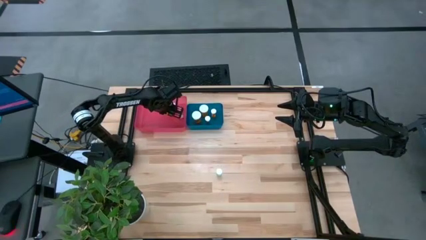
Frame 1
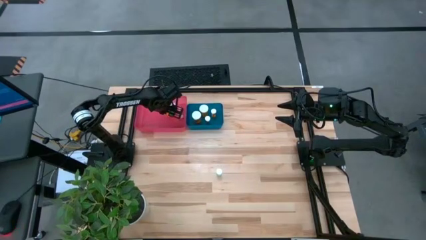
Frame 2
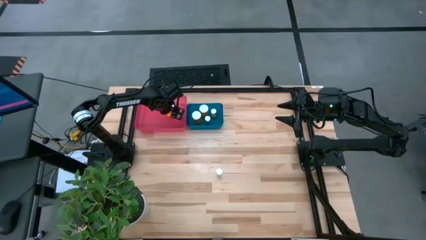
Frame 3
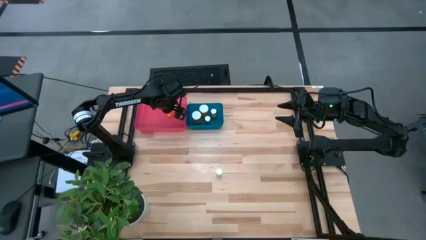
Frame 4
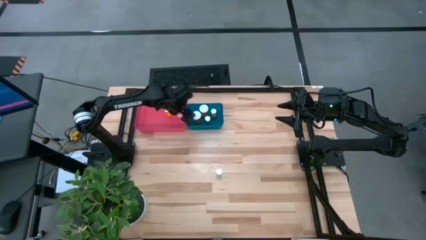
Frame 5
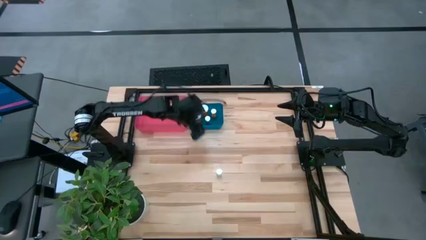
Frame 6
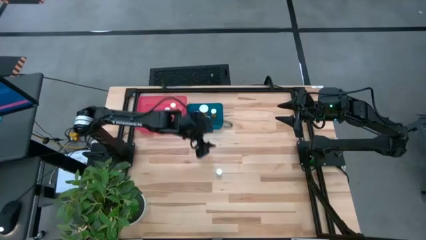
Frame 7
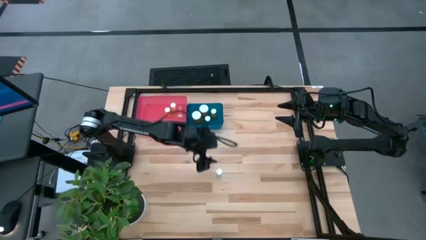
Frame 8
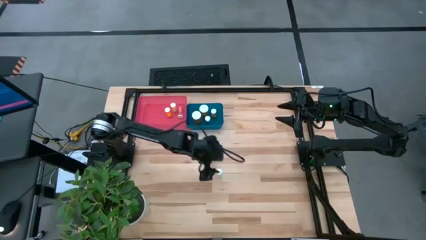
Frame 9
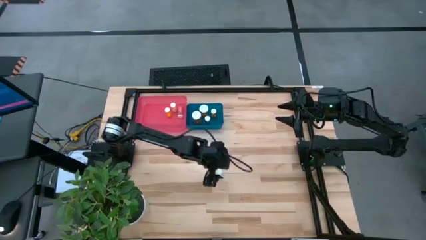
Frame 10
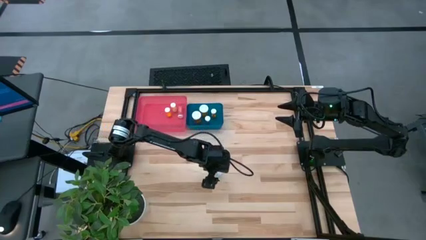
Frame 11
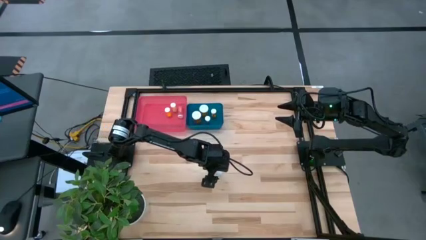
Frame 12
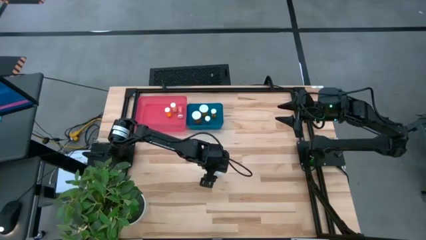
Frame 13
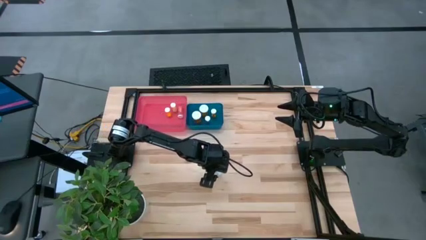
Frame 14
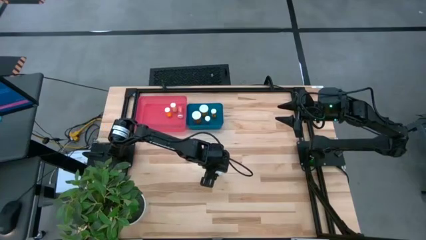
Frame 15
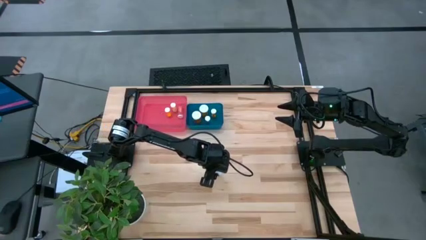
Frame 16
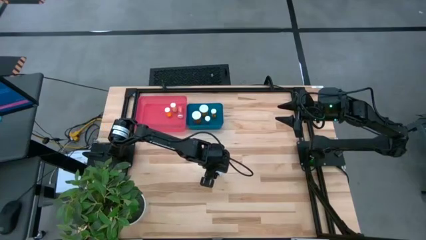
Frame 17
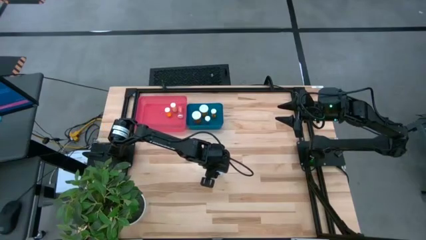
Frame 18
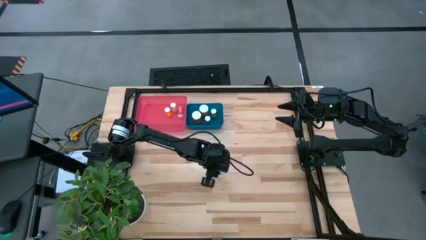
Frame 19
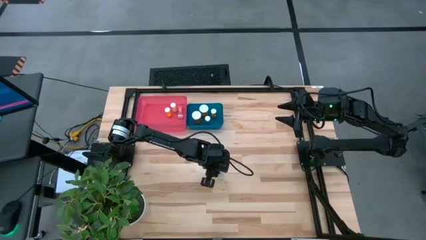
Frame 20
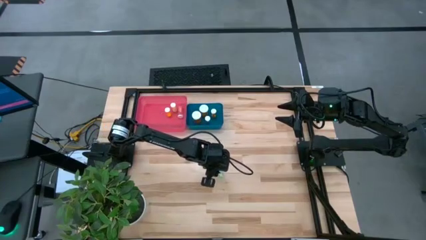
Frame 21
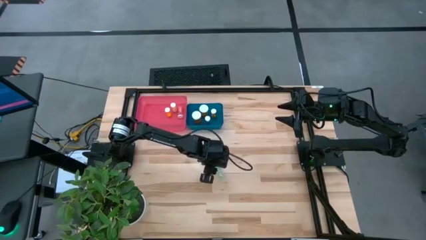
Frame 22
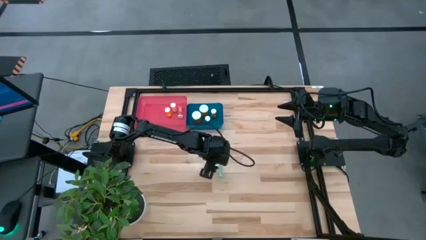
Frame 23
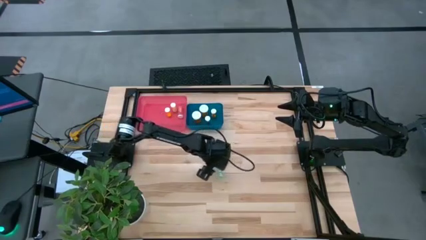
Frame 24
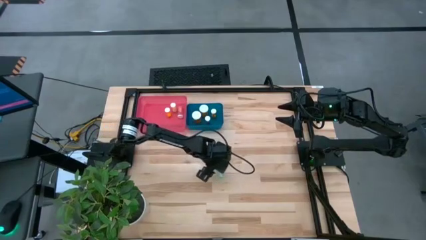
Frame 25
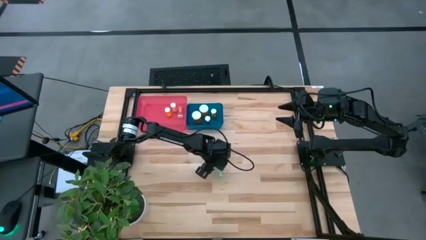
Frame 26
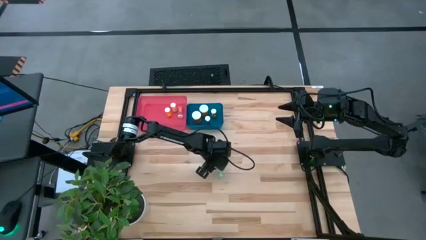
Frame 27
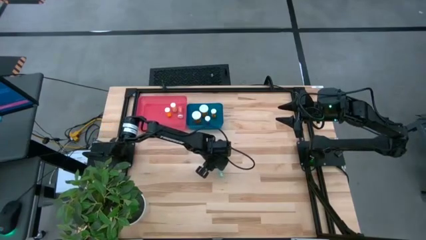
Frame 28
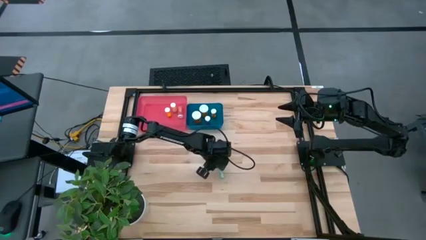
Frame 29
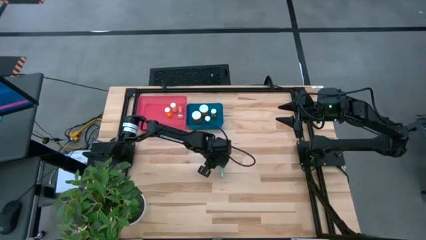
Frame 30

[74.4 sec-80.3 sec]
Task: Pick and place medicine bottles into bin by pill shape (circle, oval)
Put the green tablet bottle into the pink bin

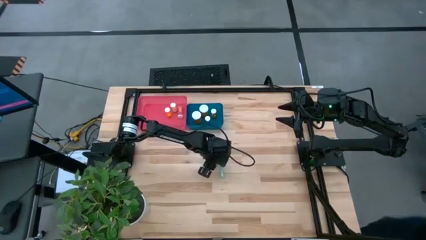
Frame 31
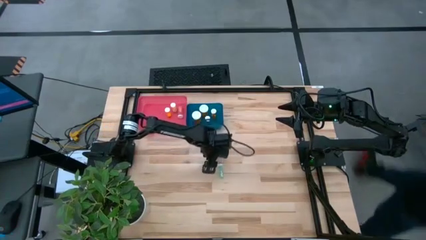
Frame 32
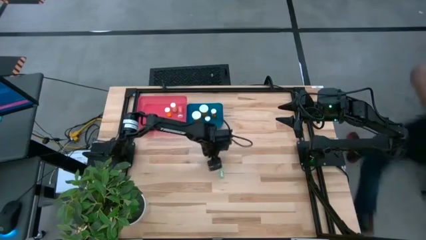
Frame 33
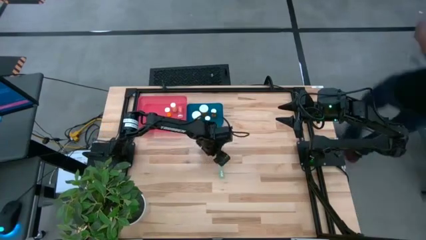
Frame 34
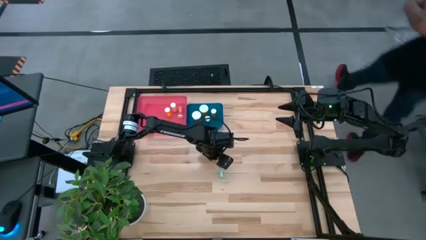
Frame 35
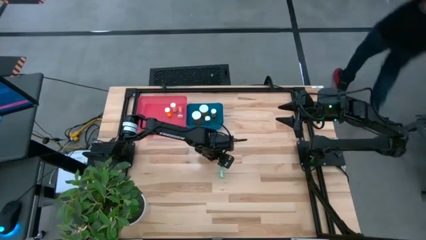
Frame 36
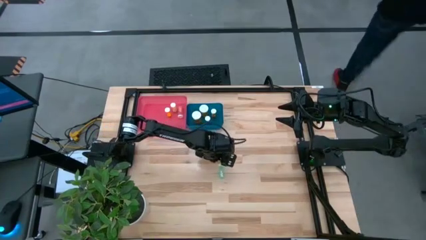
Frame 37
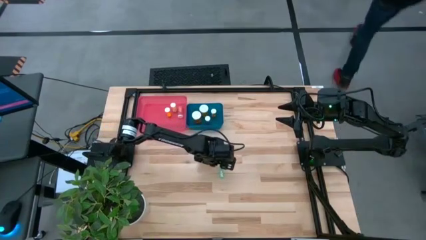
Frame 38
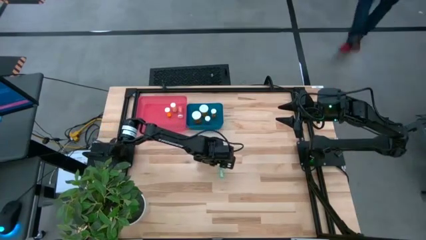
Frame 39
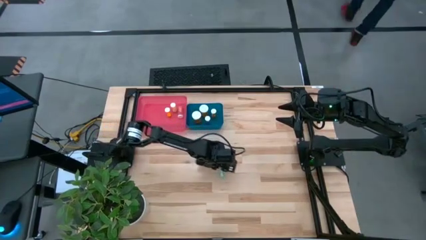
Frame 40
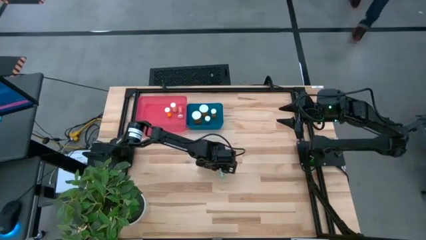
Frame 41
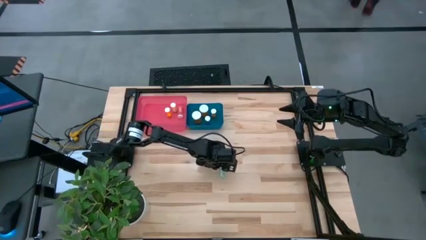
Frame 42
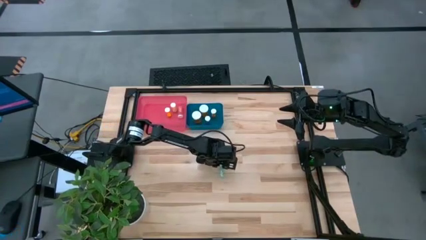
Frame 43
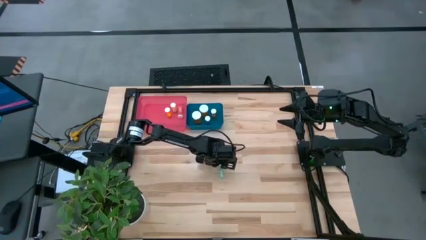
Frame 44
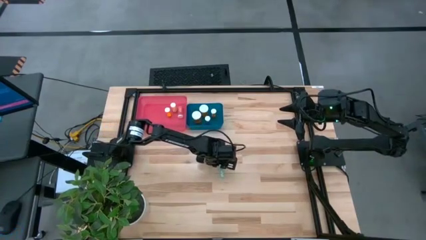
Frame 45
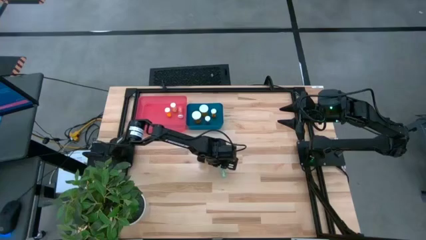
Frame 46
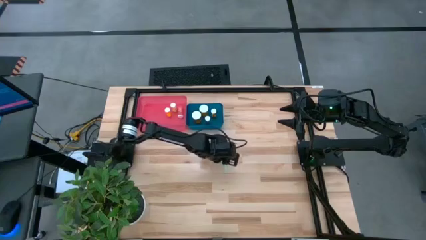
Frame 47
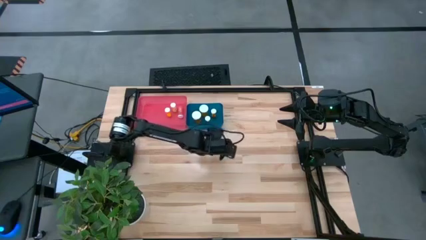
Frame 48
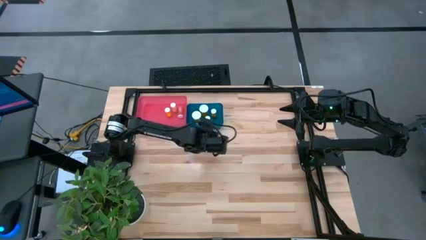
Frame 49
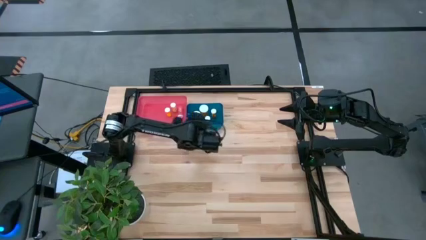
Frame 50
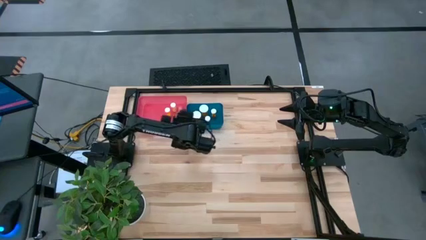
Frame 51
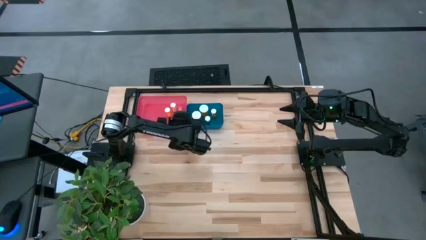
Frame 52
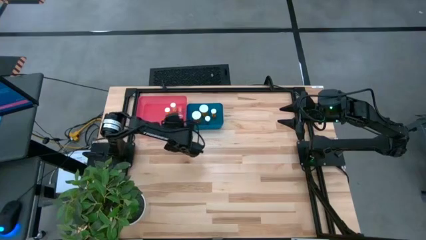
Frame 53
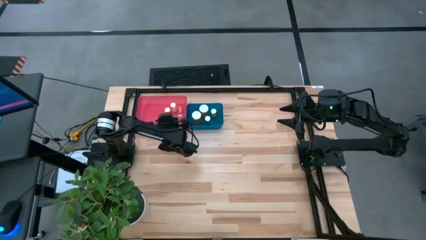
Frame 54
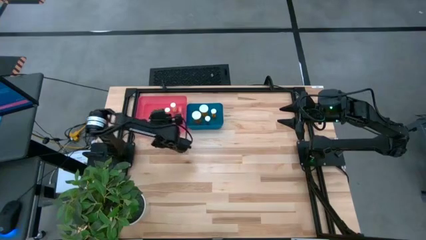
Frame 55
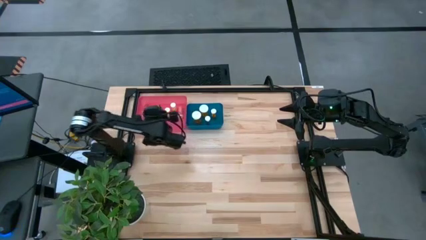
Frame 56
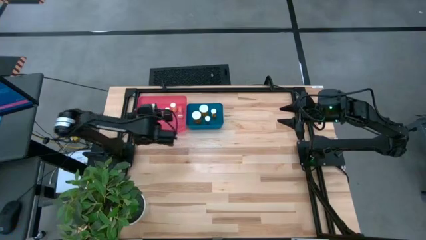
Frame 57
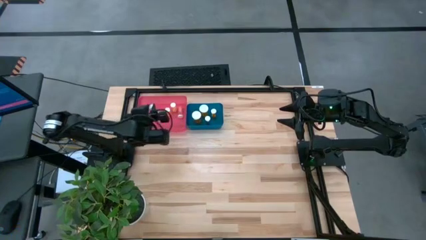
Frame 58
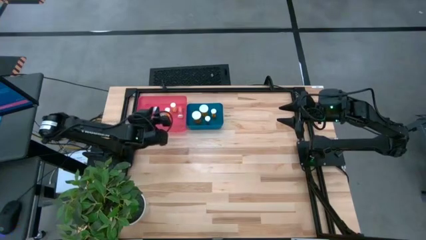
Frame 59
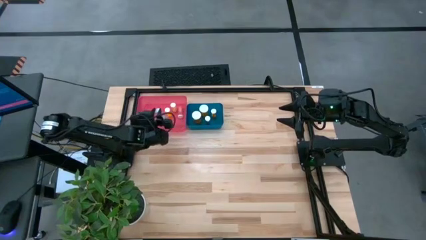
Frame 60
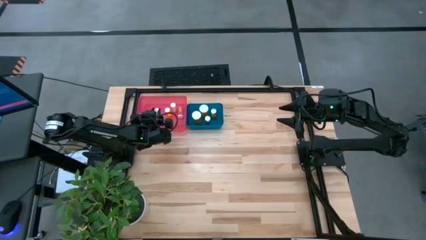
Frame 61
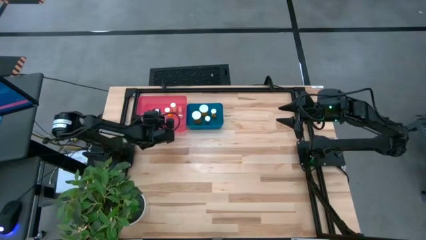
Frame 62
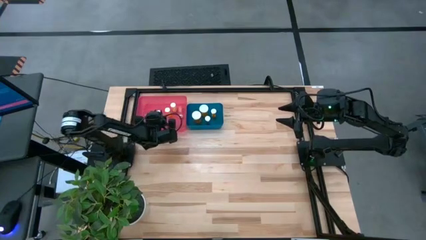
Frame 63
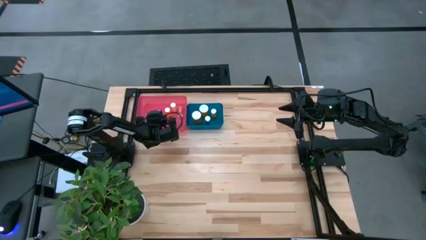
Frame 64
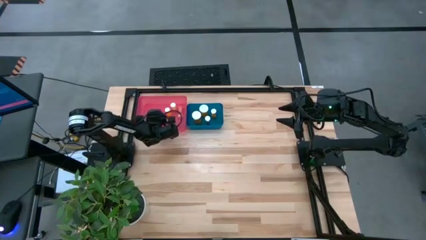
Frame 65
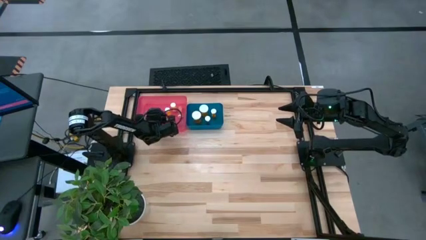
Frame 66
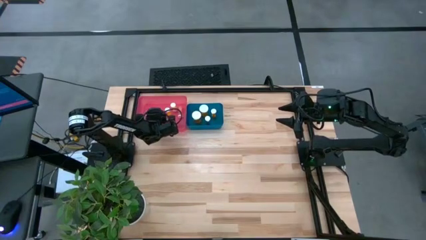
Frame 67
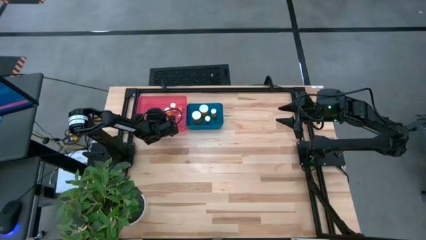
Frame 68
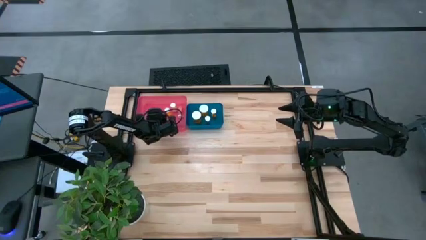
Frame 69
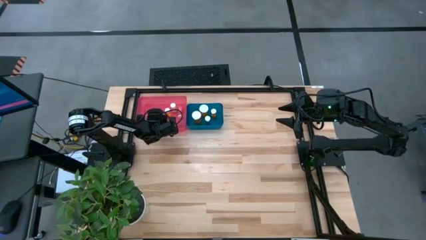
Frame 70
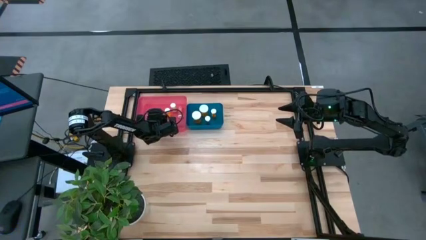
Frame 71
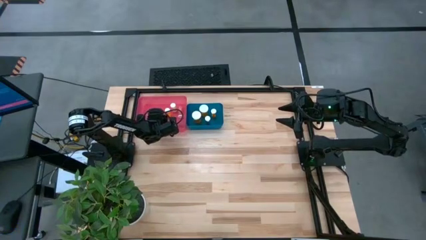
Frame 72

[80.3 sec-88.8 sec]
Put the green tablet bottle into the pink bin

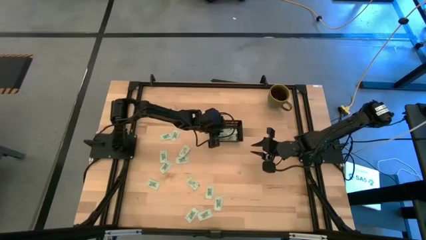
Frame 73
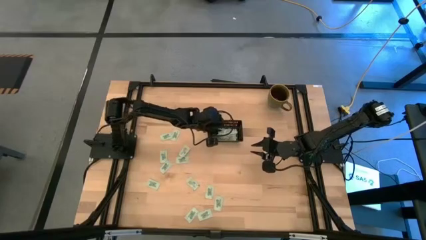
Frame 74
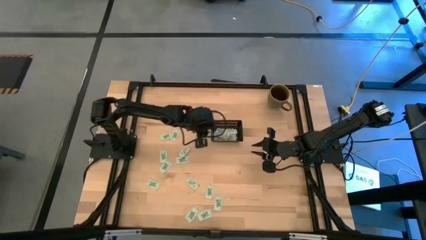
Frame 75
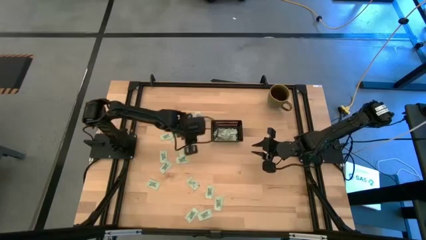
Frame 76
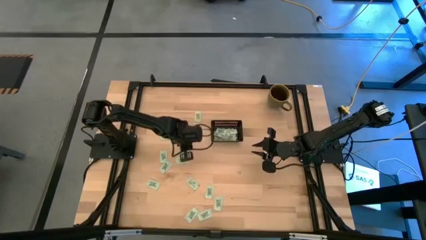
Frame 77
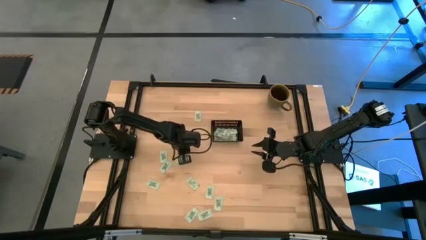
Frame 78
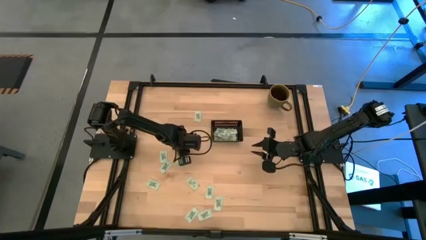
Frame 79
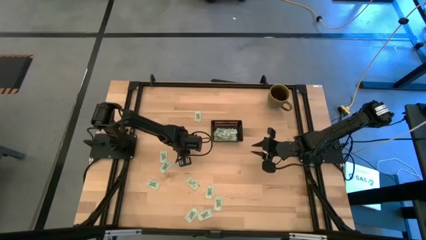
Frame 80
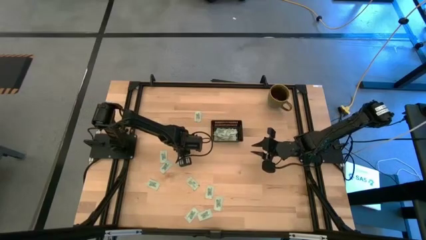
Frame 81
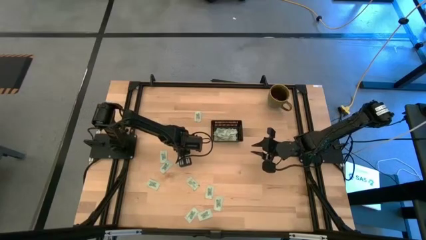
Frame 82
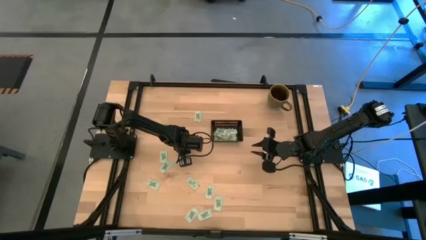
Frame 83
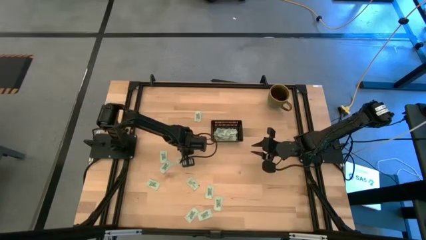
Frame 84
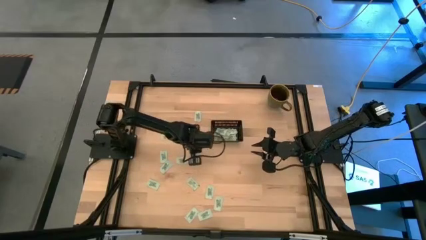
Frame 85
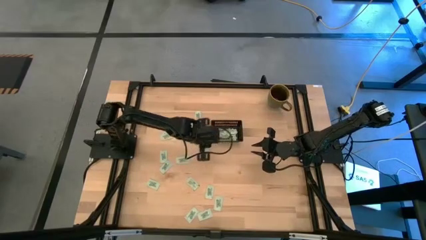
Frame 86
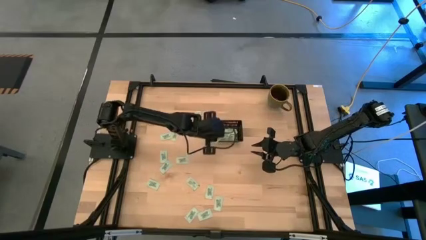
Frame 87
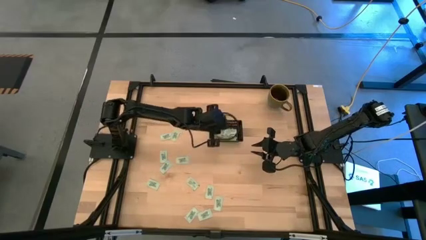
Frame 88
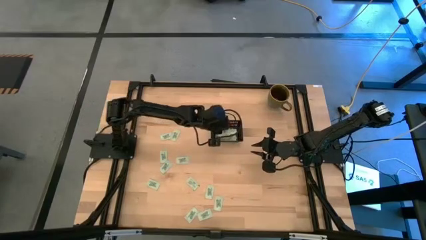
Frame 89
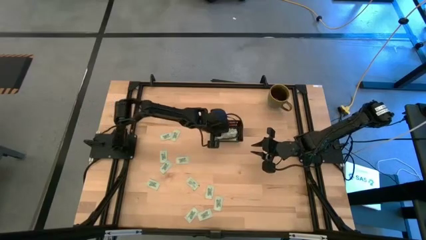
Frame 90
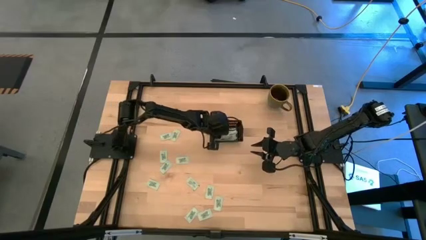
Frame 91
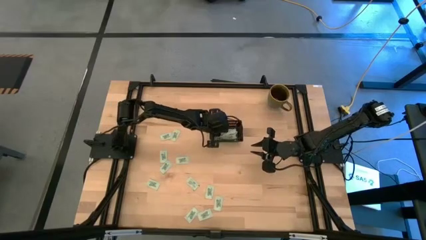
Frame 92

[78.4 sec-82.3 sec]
Task: Pick and place Stevia / Truvia into bins
Put the stevia packet into the black basket
